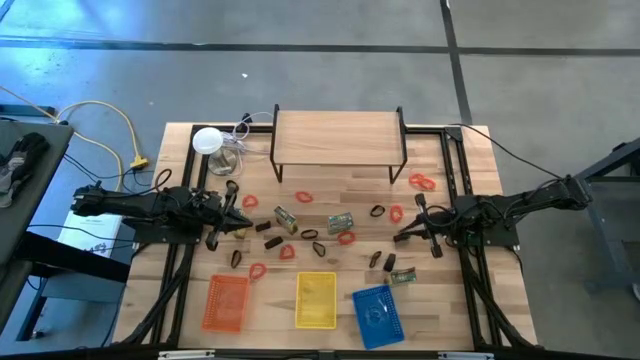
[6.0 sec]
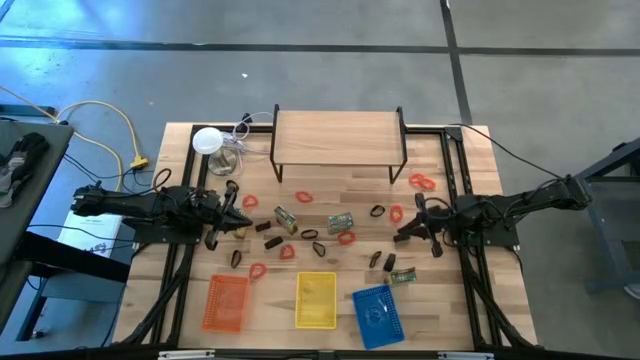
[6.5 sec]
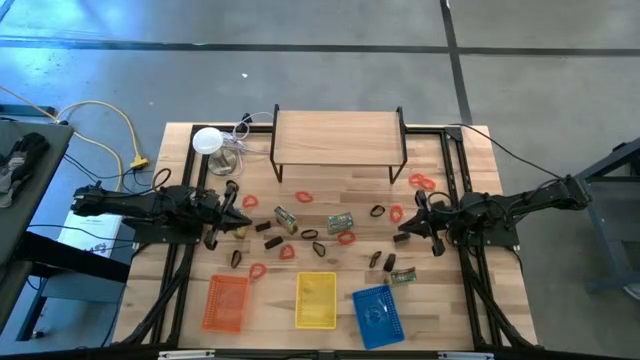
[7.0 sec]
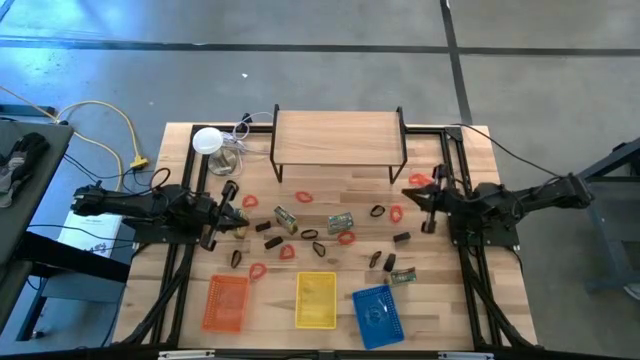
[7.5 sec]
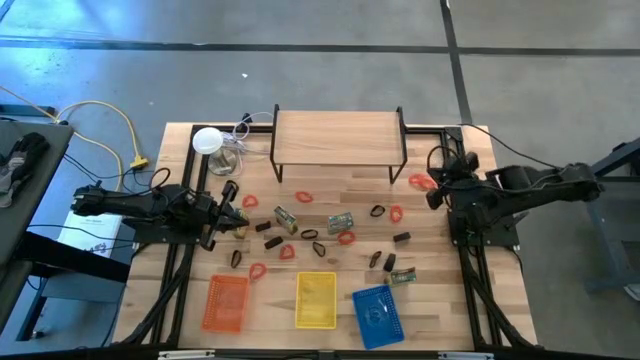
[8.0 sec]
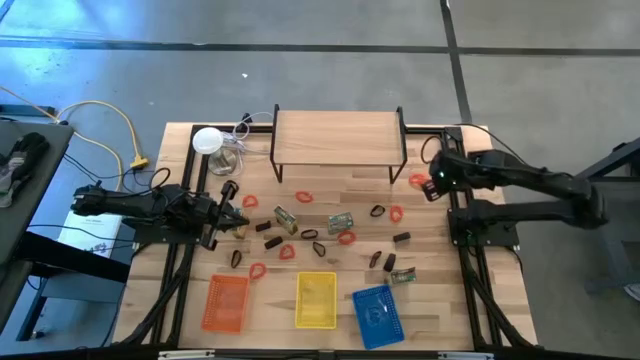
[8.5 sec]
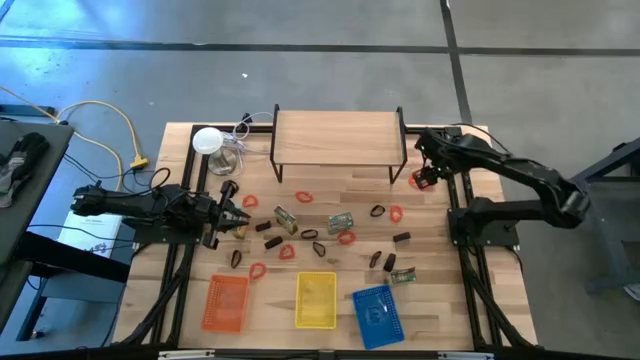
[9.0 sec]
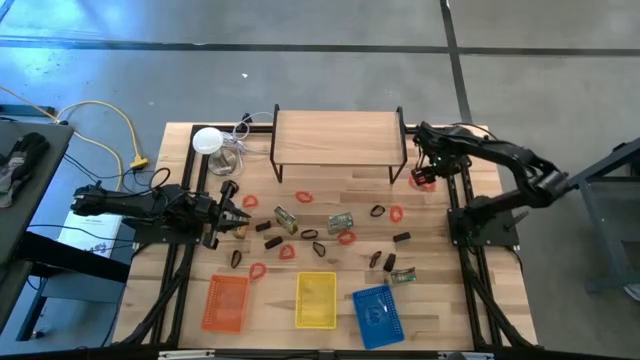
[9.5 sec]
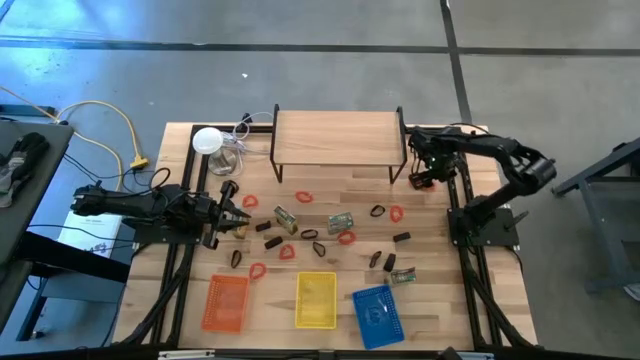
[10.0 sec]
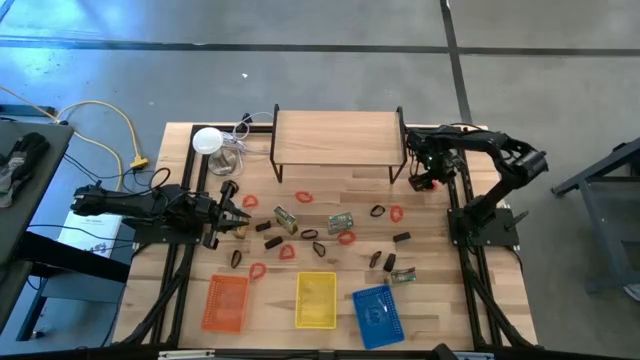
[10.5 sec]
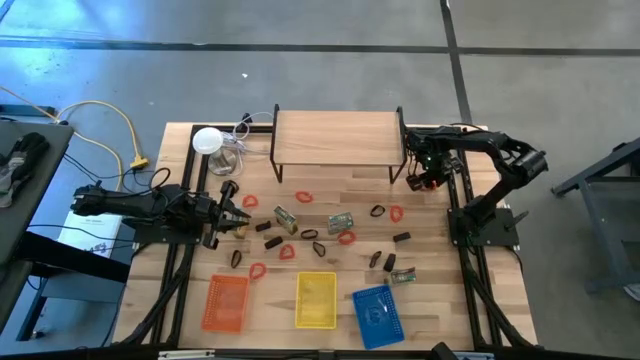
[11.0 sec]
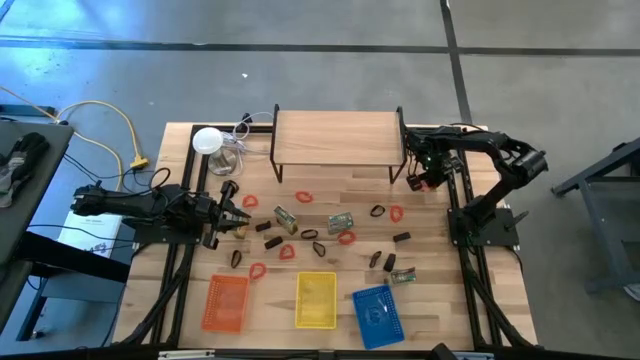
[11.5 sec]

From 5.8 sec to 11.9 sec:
Task: Pick & Place Office Desk Supplies
Put the orange spring keychain into the blue bin

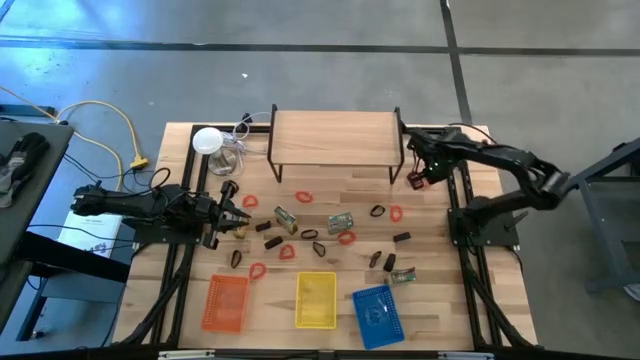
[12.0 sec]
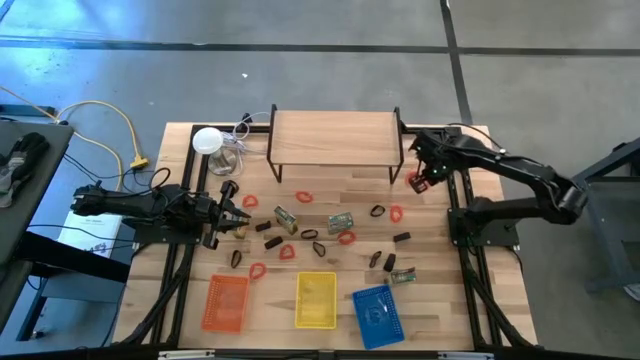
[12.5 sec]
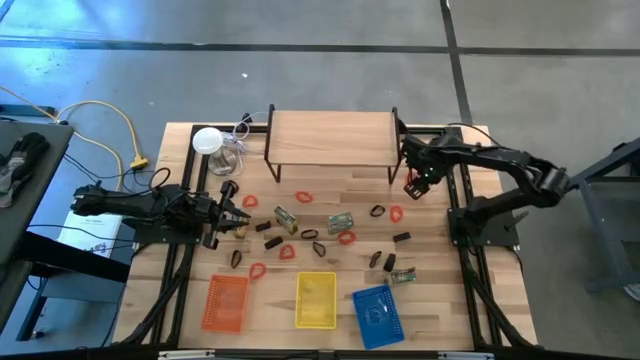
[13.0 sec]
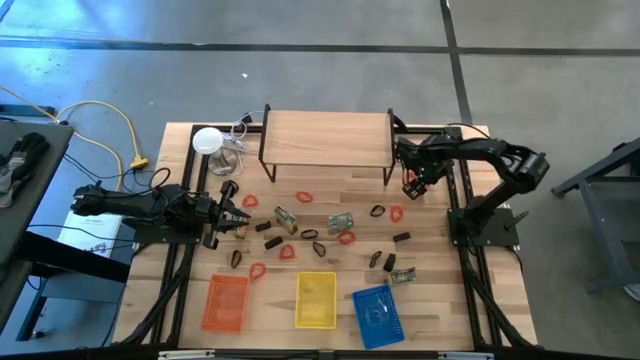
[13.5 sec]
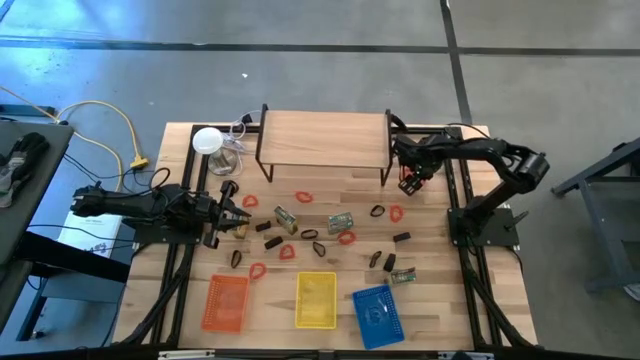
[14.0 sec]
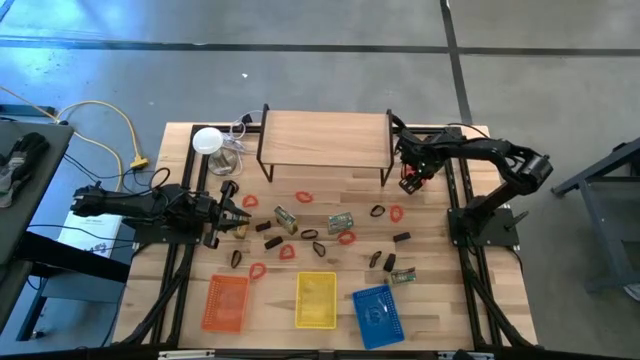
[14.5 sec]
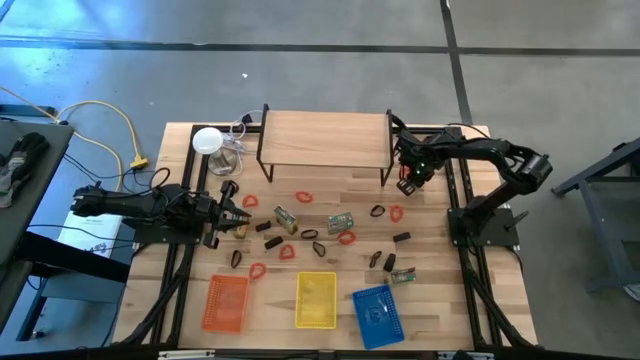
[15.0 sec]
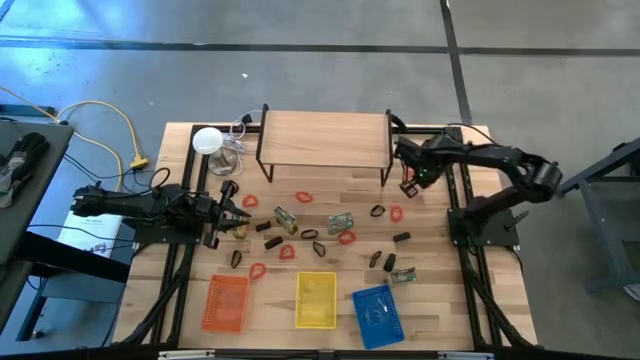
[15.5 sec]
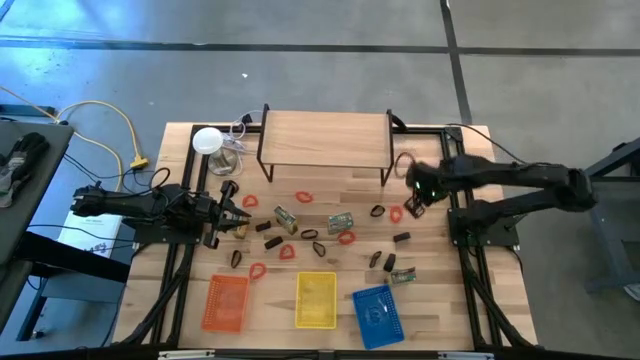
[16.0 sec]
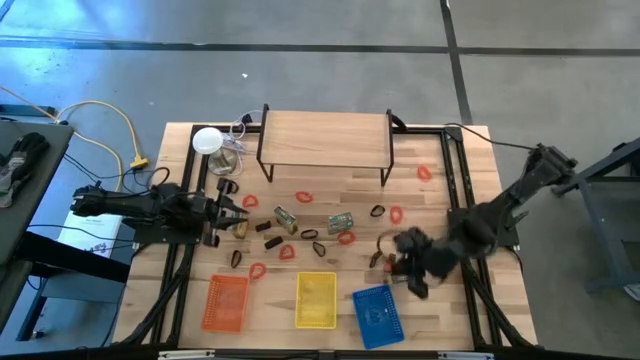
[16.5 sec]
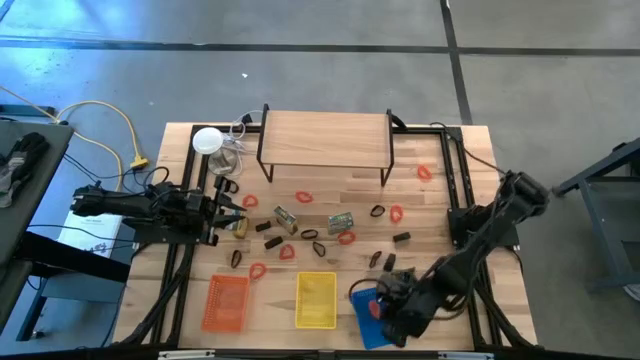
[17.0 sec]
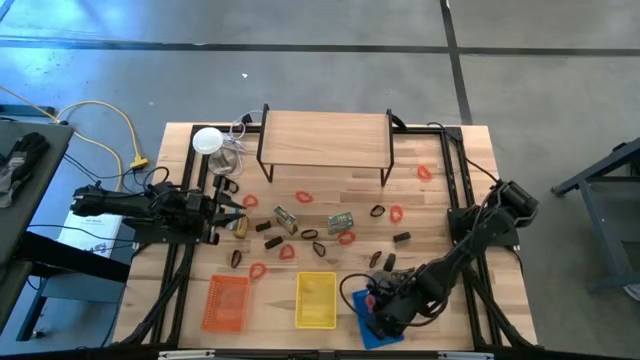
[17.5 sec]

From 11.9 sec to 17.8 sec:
Put the orange spring keychain into the blue bin

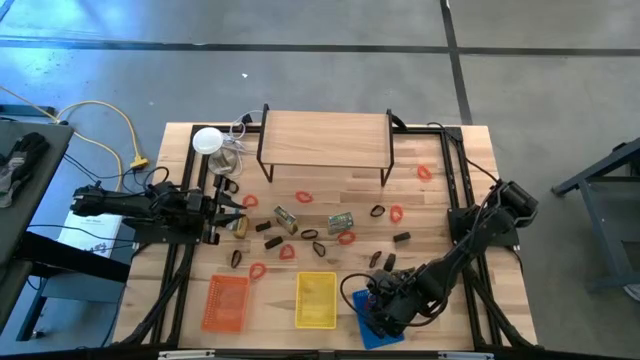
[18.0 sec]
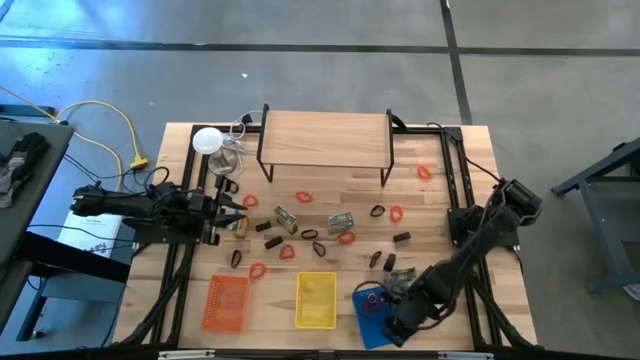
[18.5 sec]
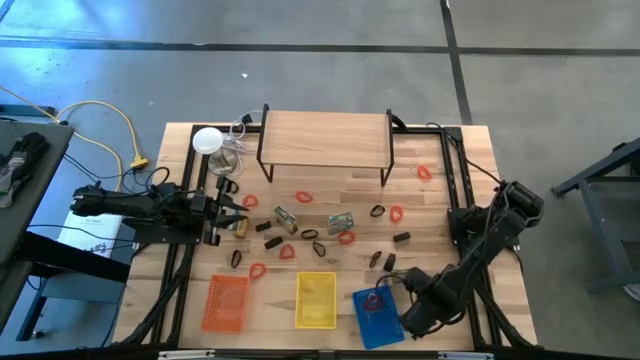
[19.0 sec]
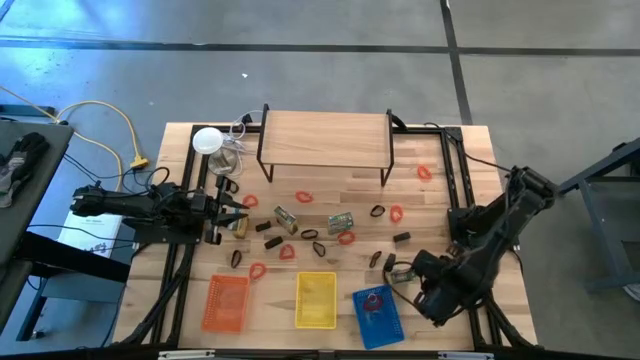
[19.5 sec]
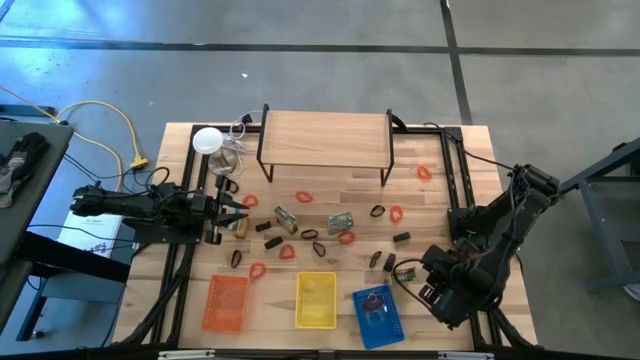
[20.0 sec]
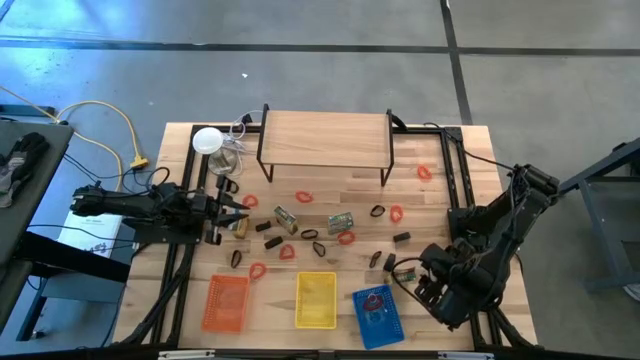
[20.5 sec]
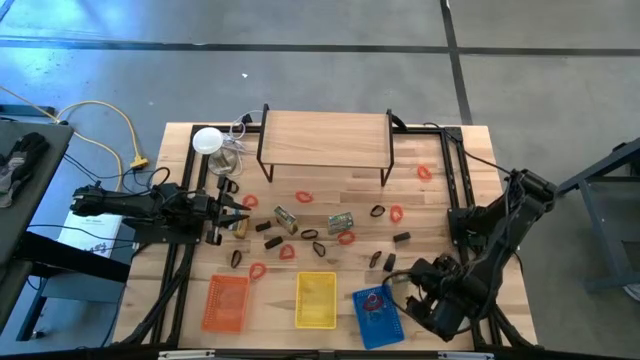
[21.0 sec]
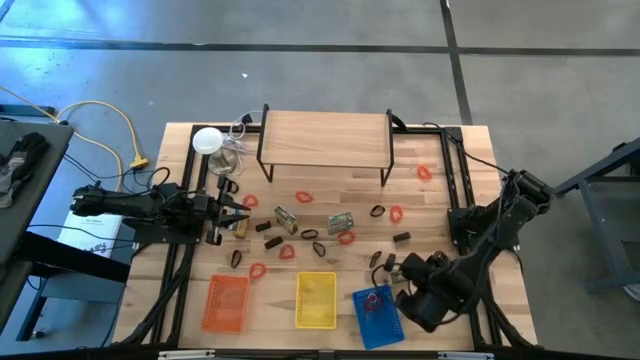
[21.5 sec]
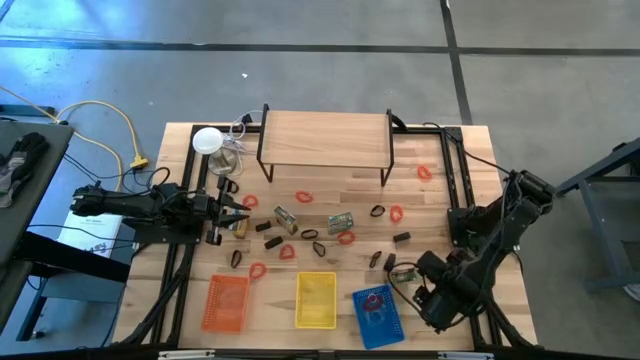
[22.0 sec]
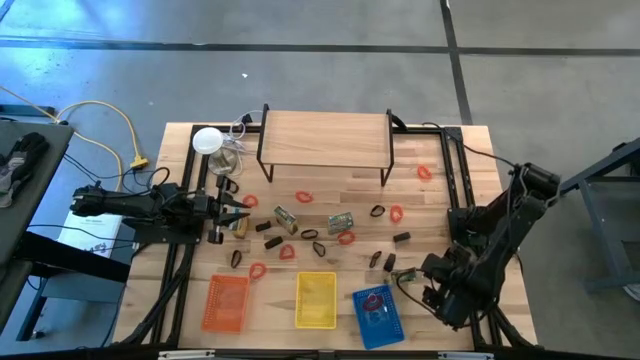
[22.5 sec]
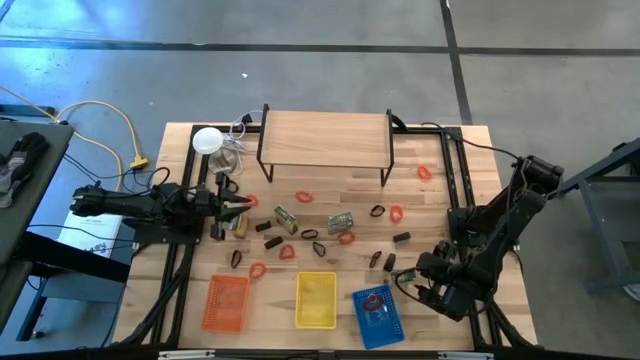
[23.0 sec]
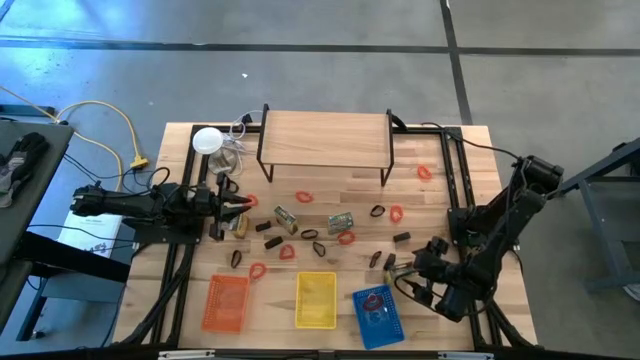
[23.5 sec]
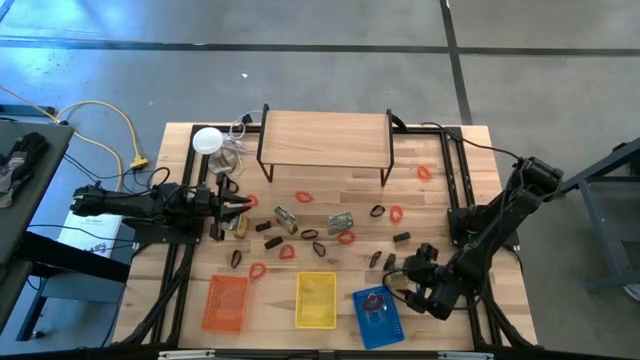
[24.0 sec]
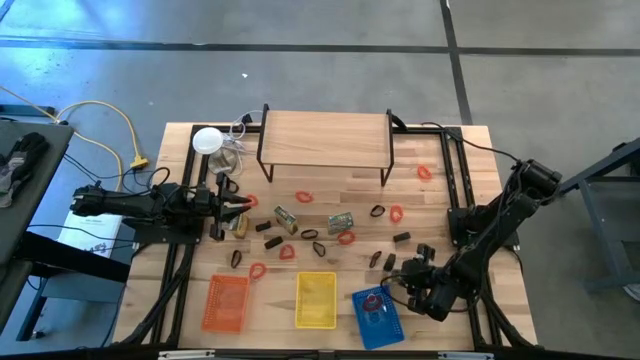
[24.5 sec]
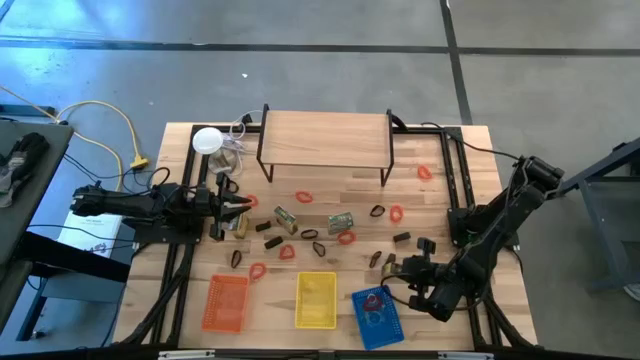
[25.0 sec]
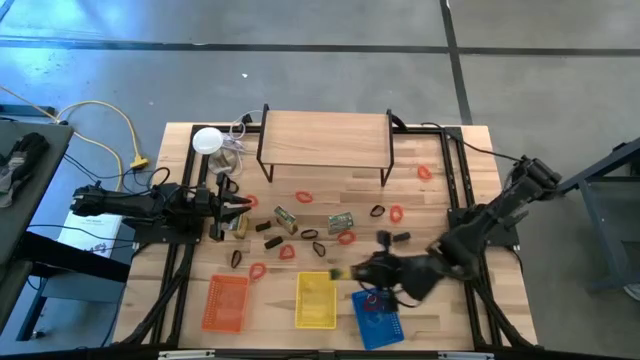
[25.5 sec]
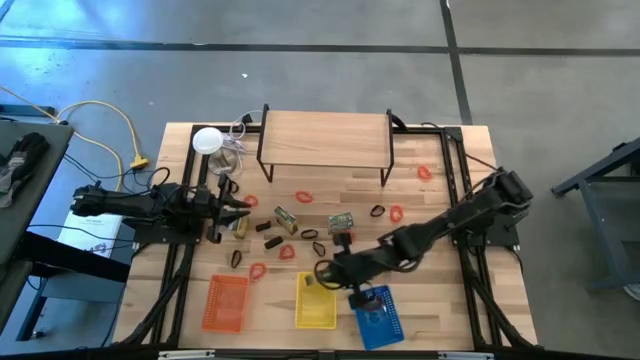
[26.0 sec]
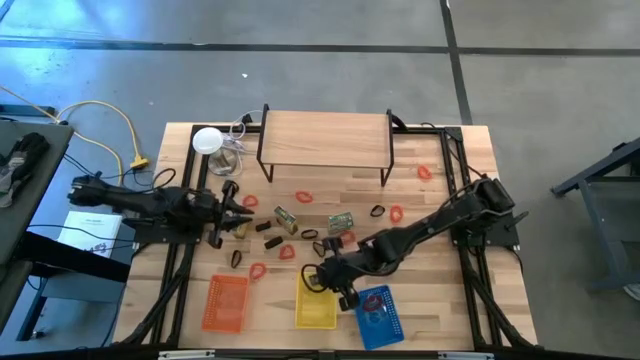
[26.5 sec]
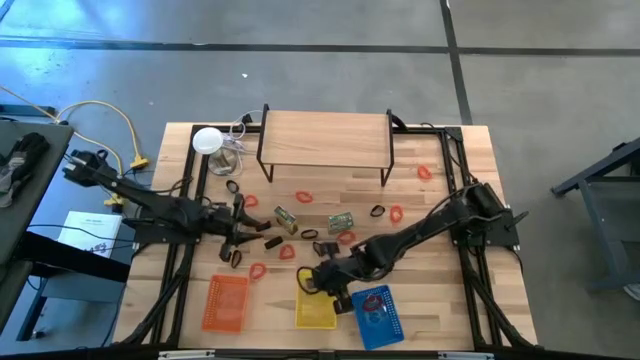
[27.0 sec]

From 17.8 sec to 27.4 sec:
Put the yellow crayon box into the yellow bin
